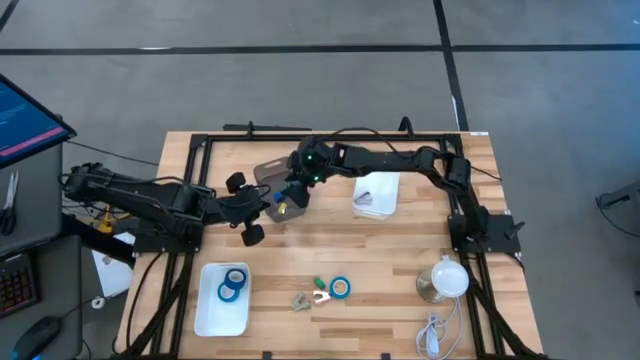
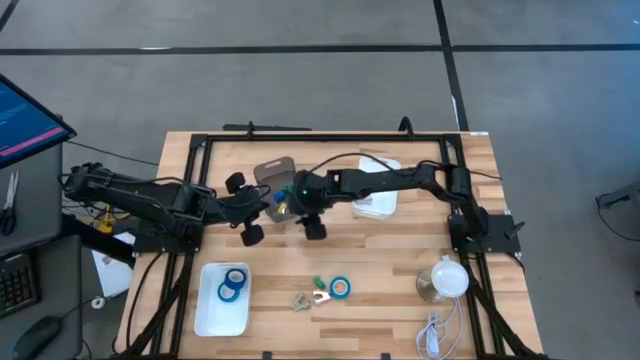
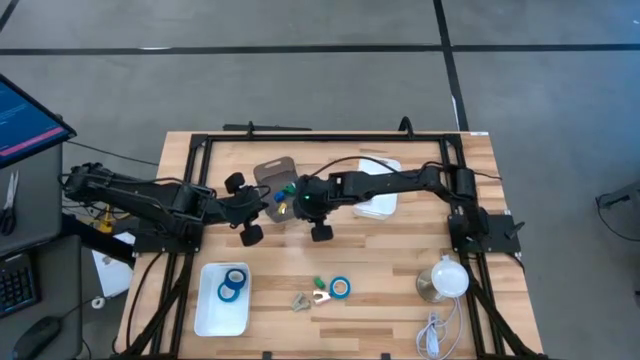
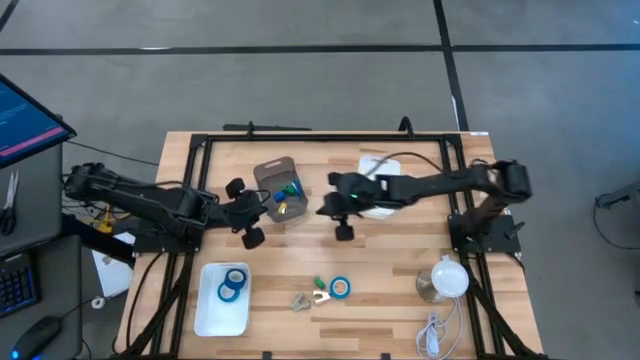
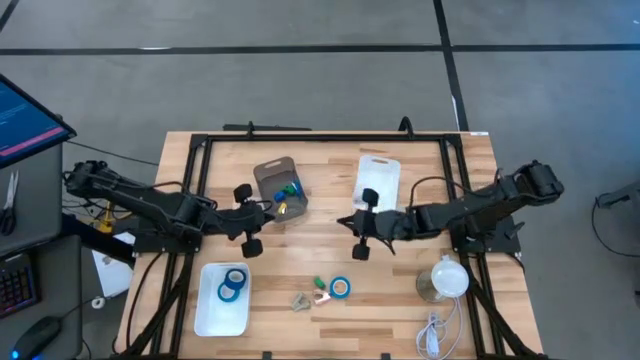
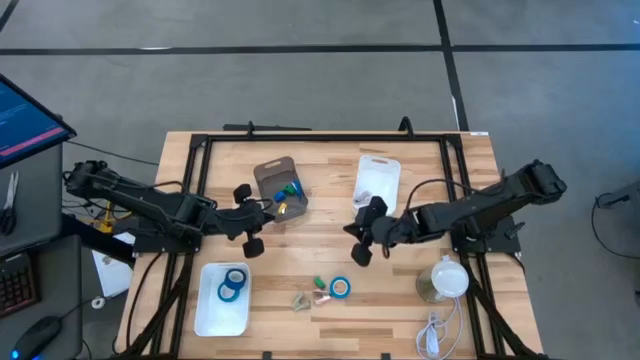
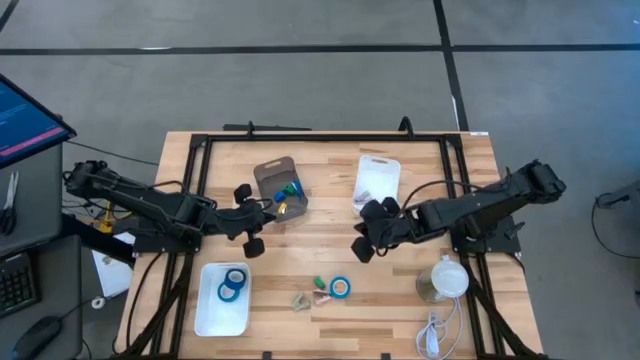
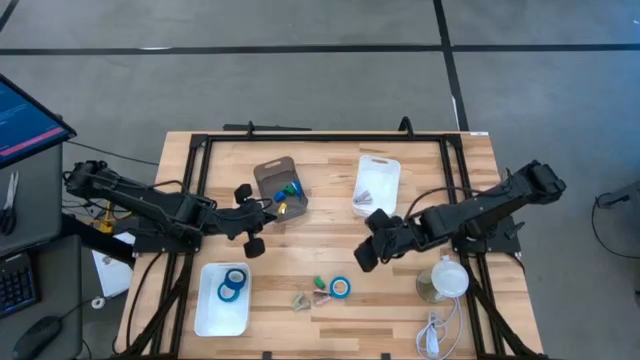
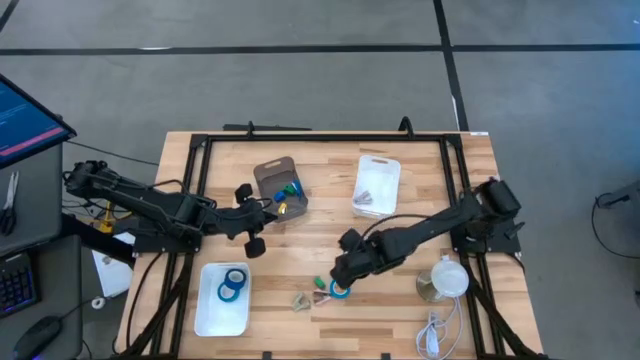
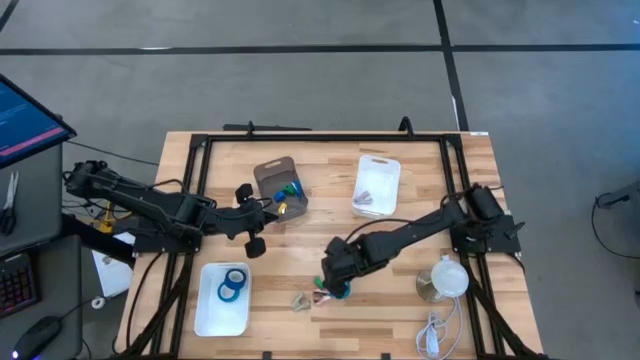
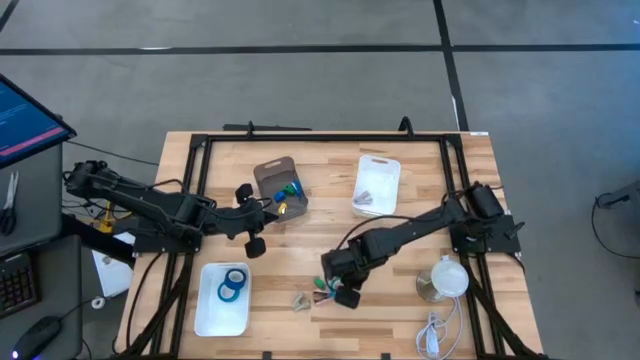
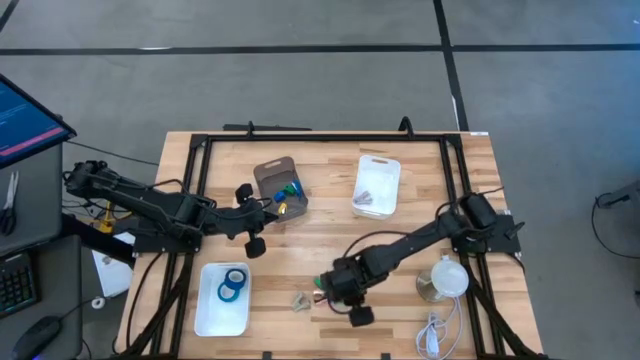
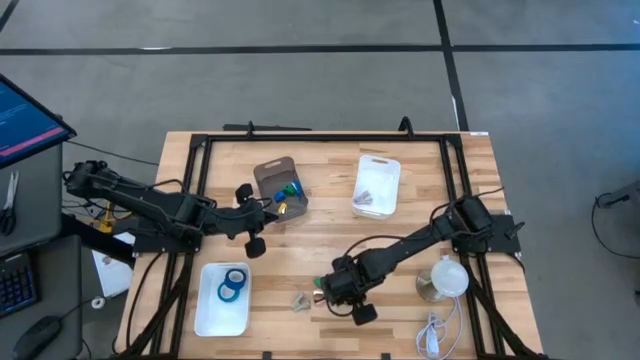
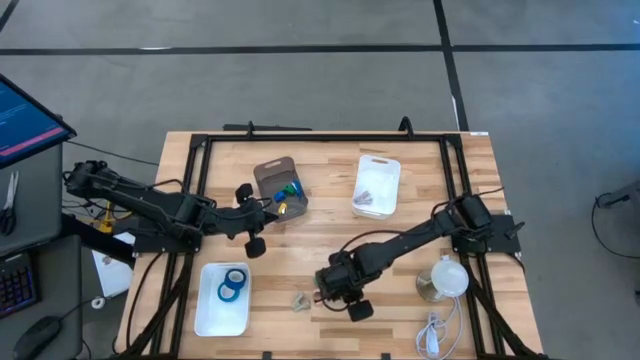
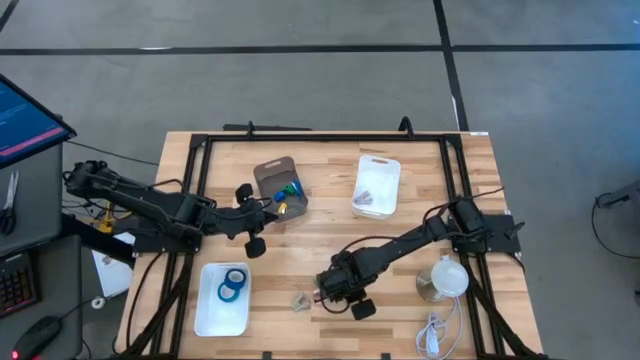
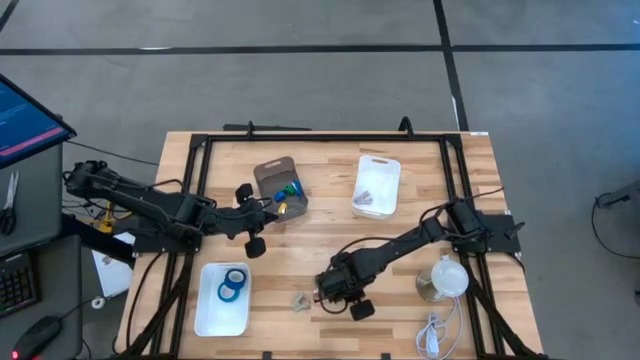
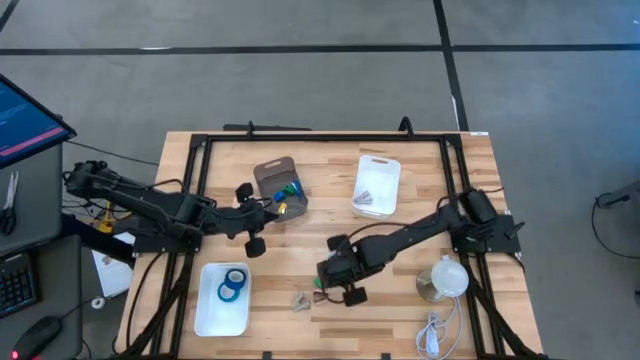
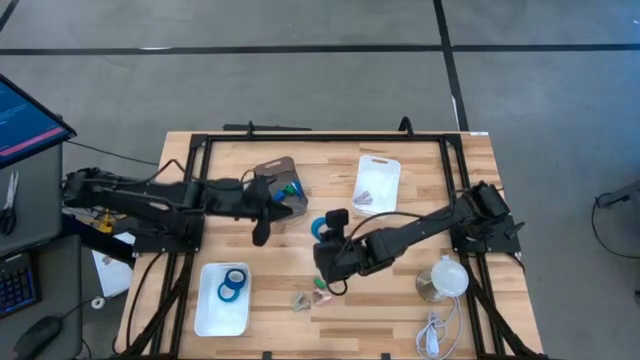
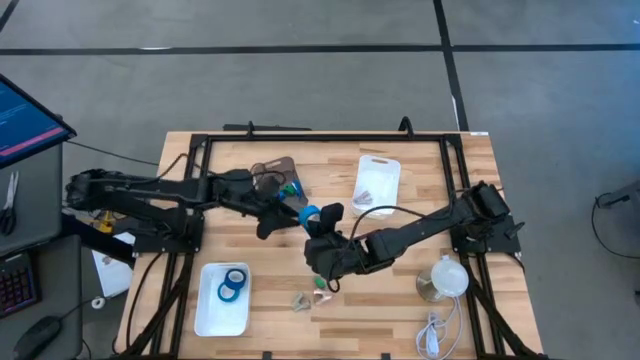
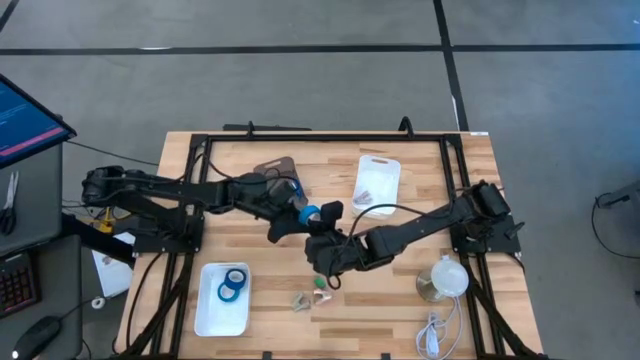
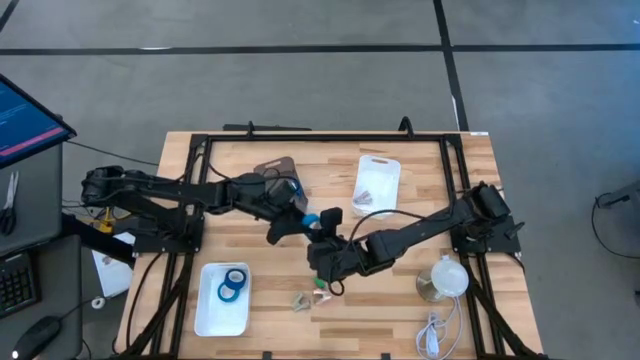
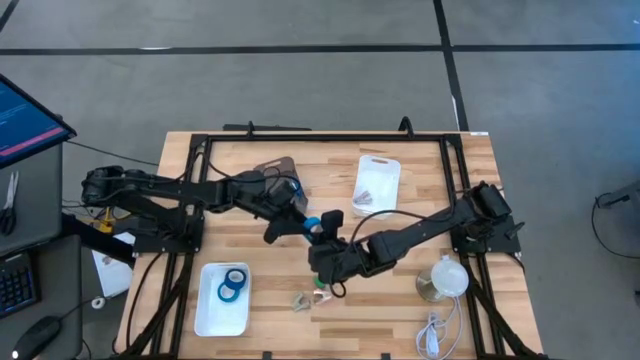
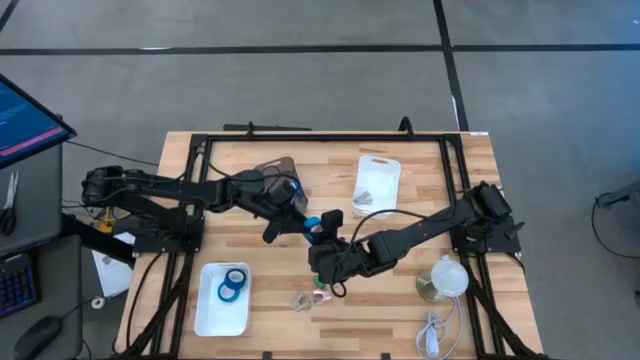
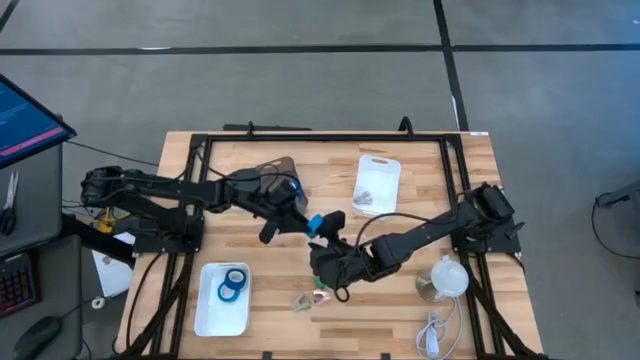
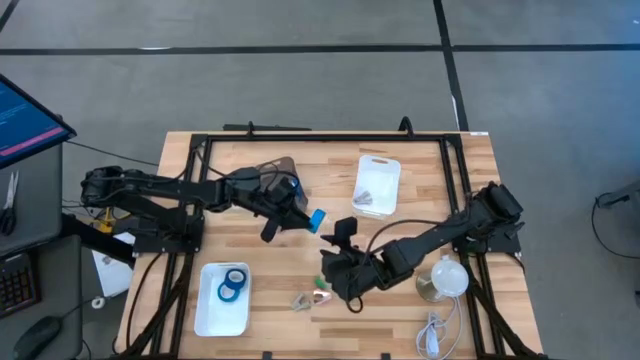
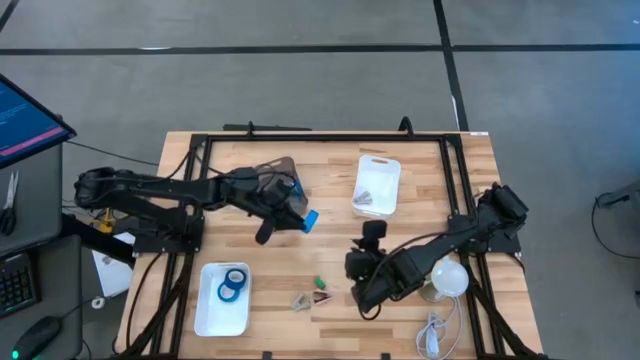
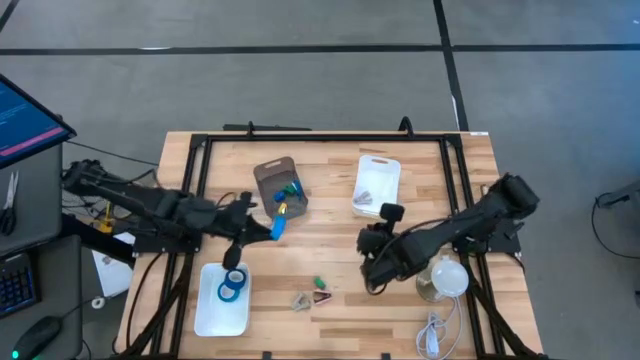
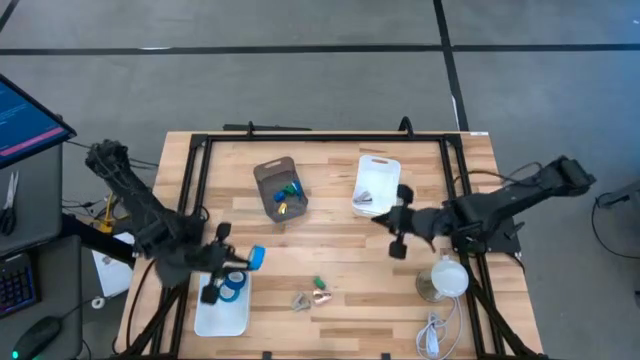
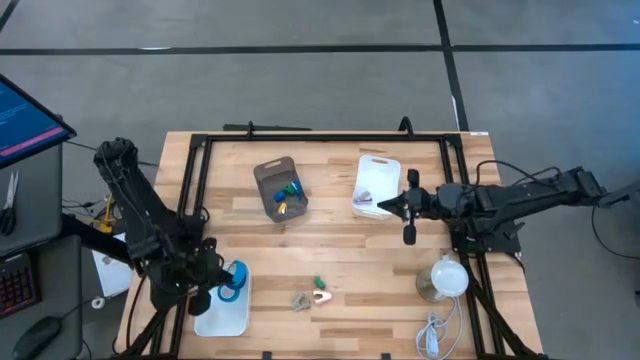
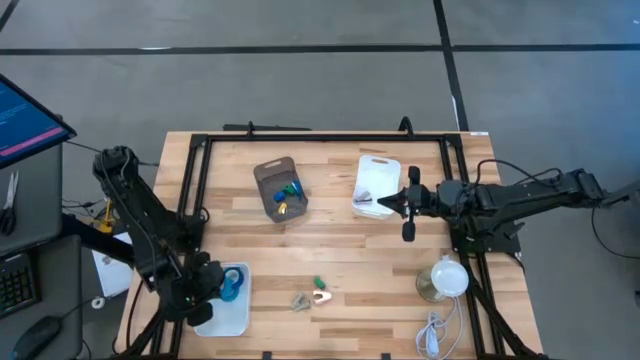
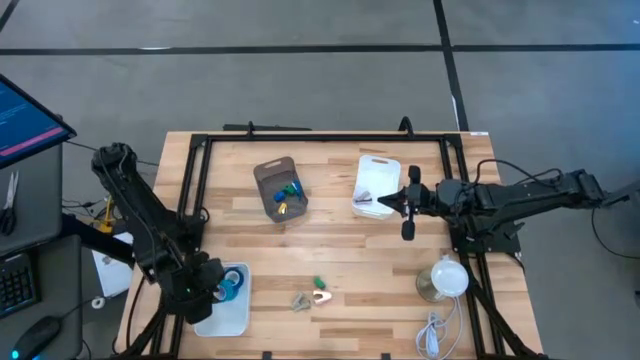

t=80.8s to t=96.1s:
Task: Pick and place Stapler, Stapler remover, tape
Put the light blue tape into the bottom white bin

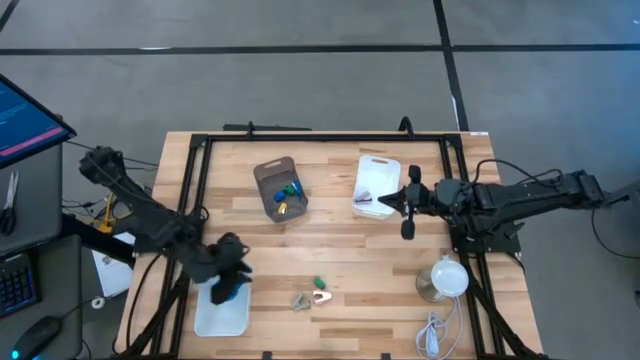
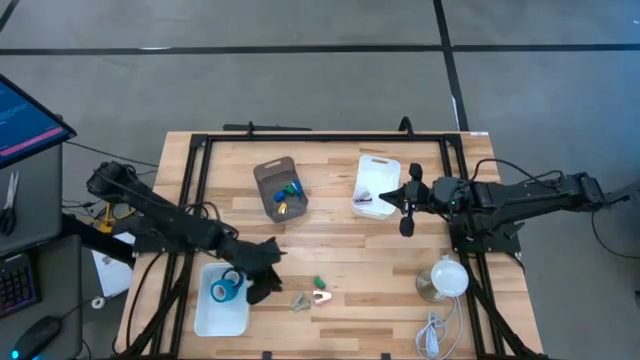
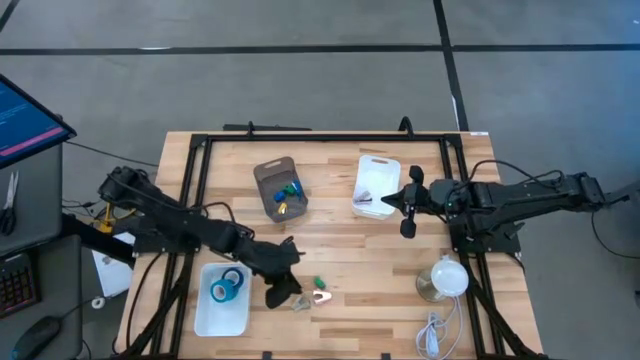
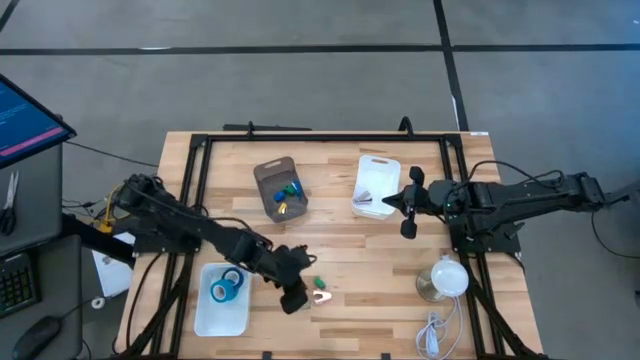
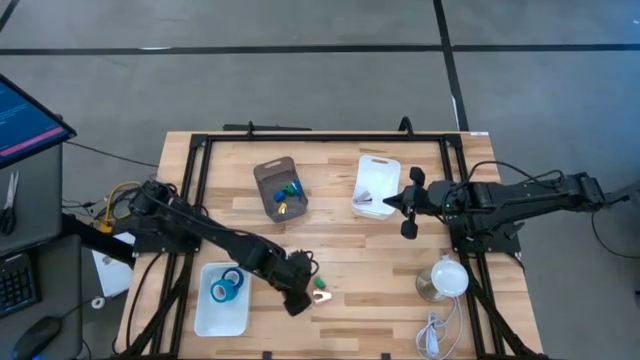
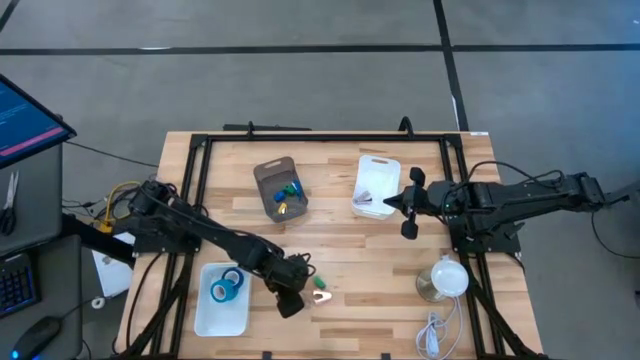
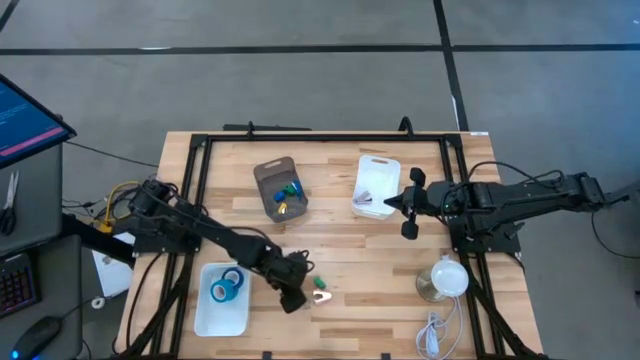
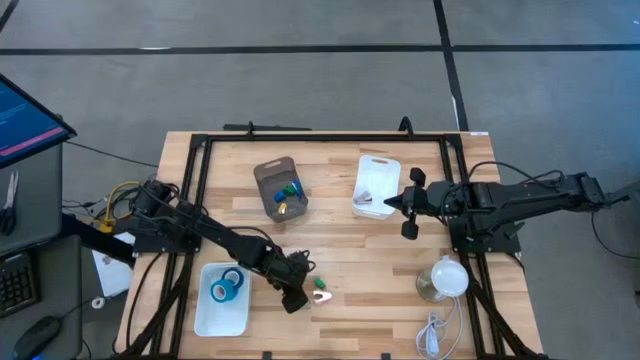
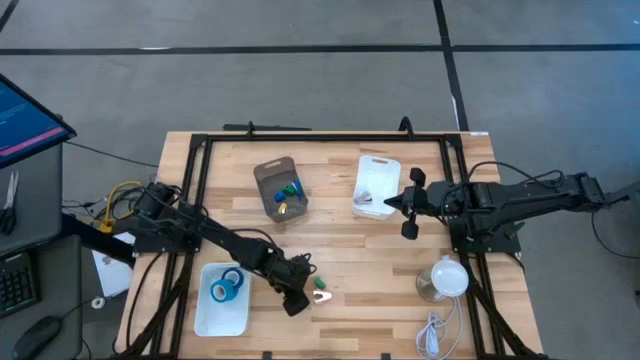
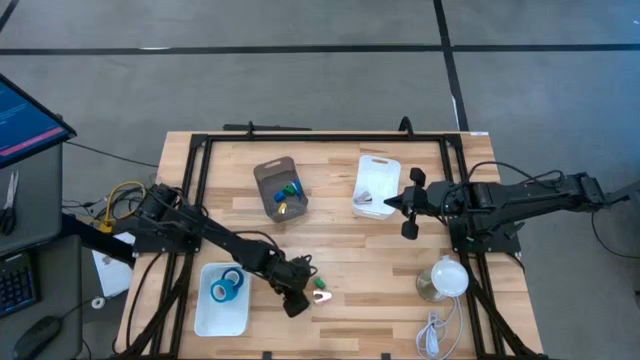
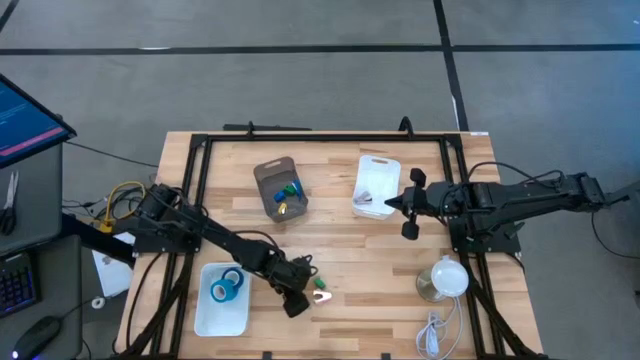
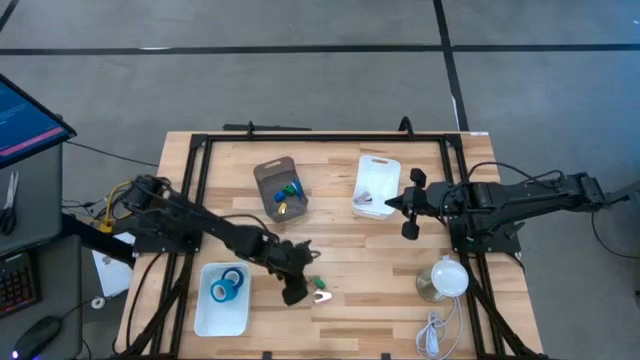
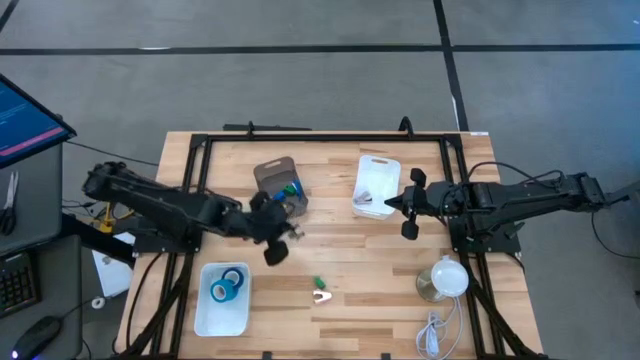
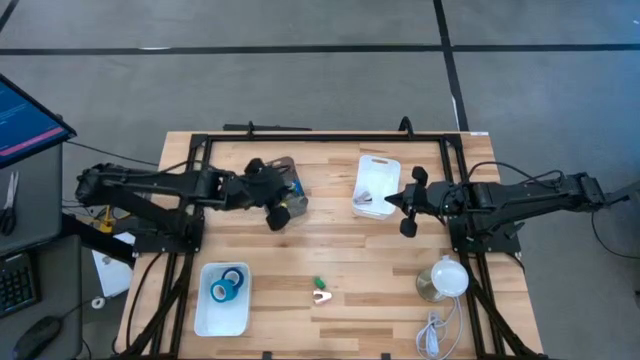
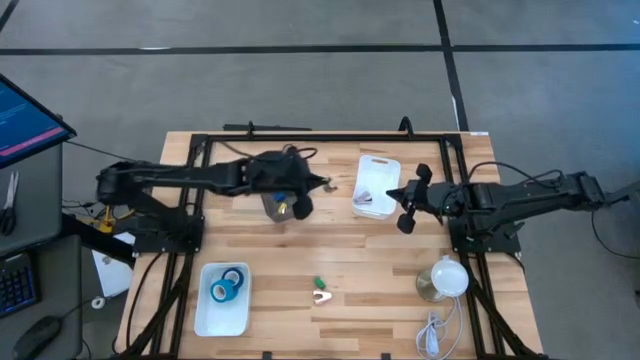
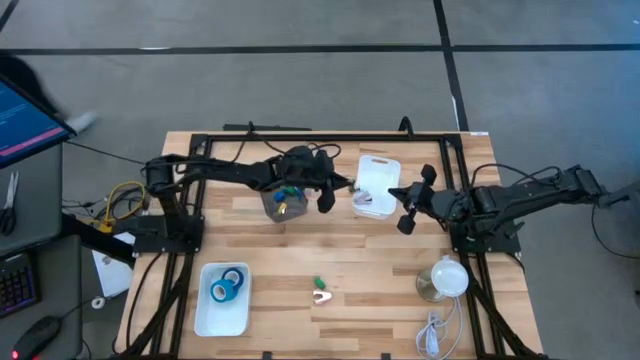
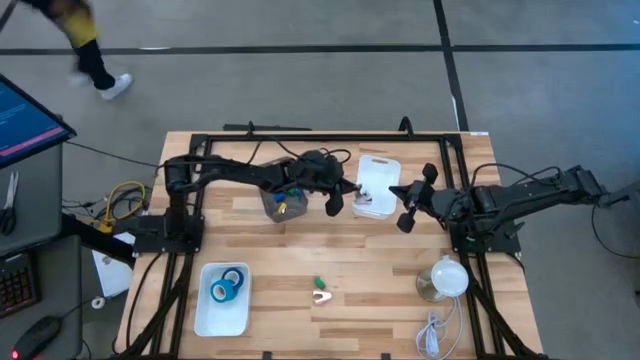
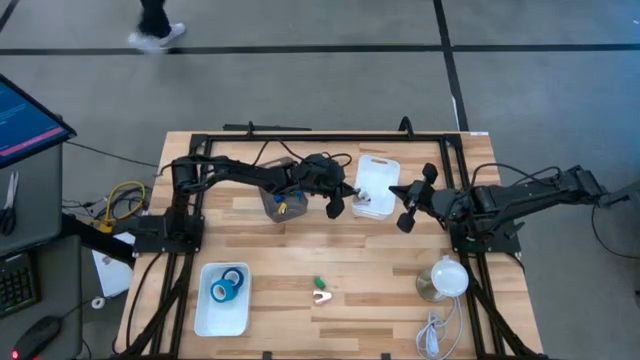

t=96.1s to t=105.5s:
Put the gray stapler remover into the top white bin
